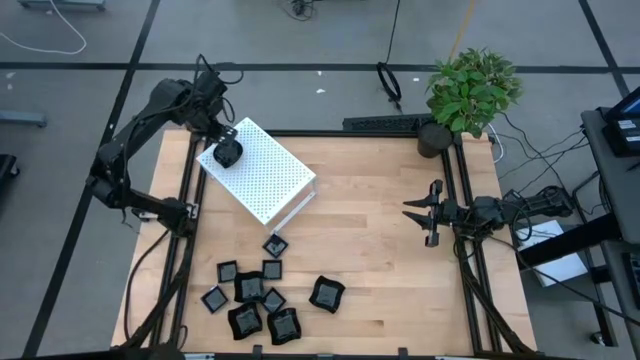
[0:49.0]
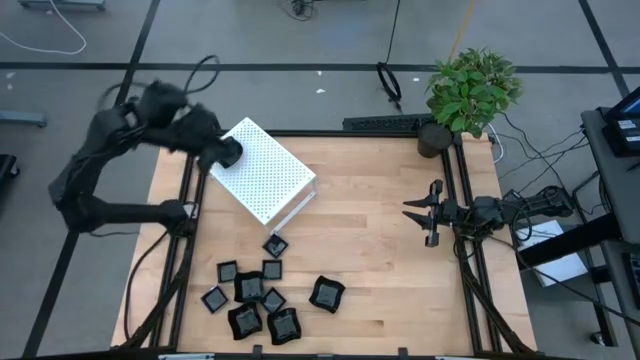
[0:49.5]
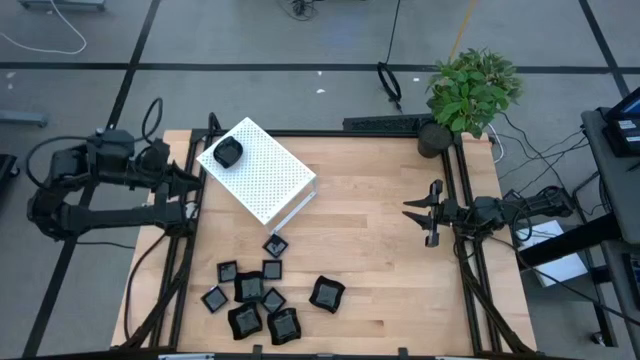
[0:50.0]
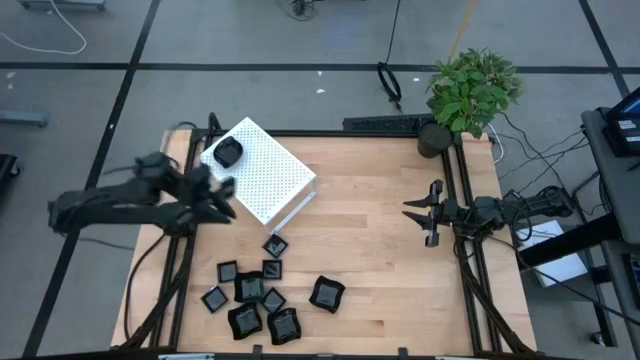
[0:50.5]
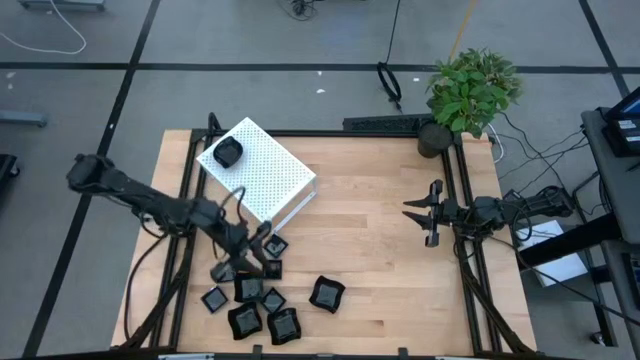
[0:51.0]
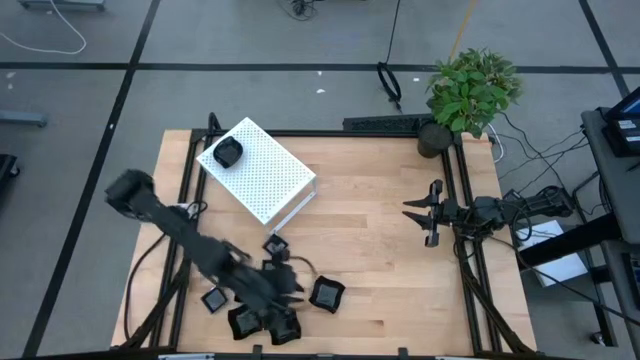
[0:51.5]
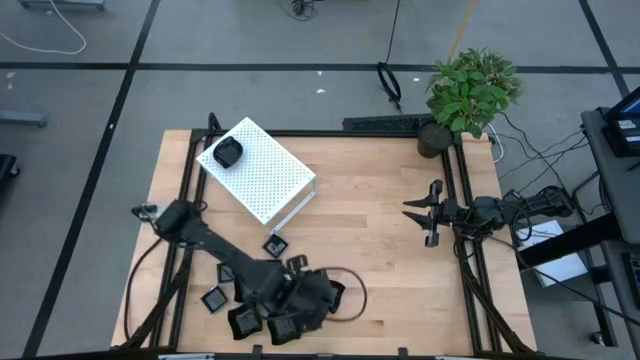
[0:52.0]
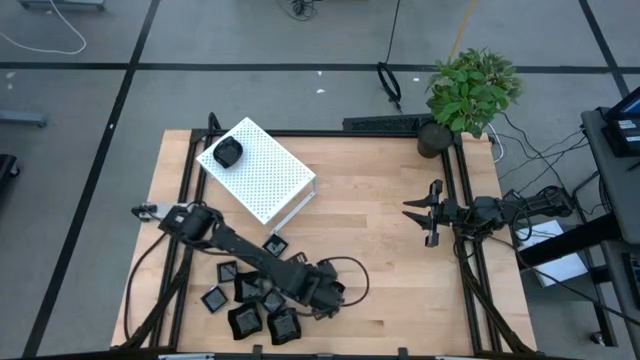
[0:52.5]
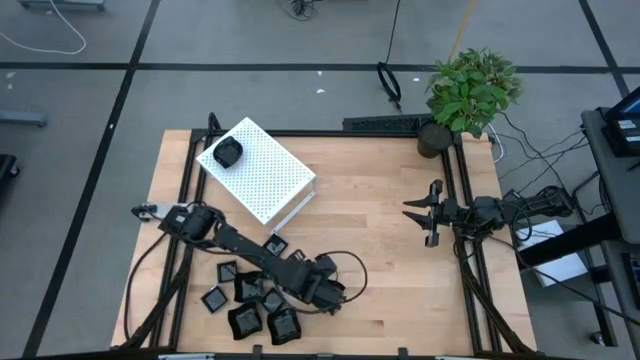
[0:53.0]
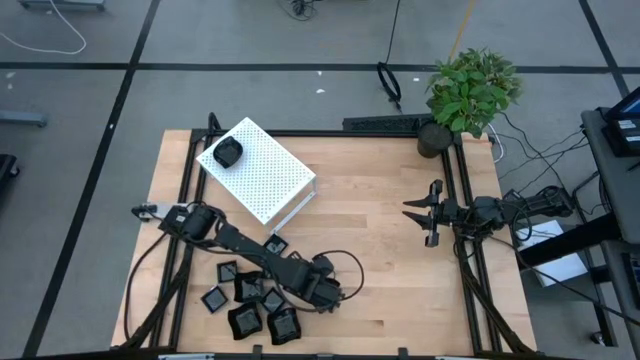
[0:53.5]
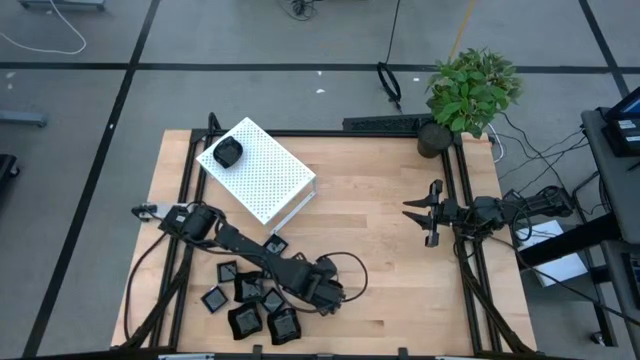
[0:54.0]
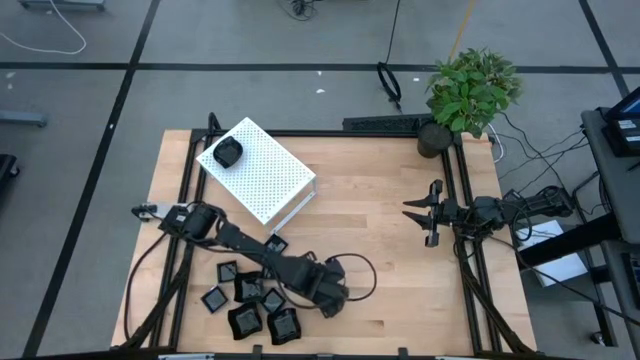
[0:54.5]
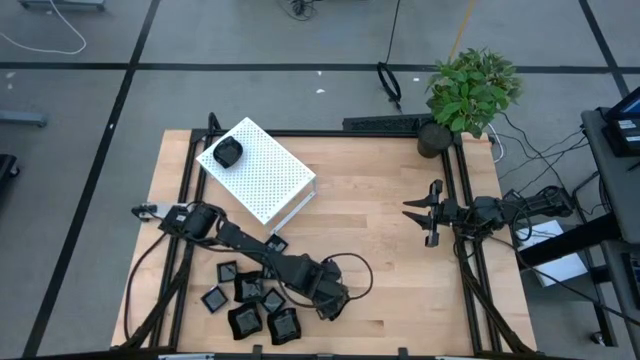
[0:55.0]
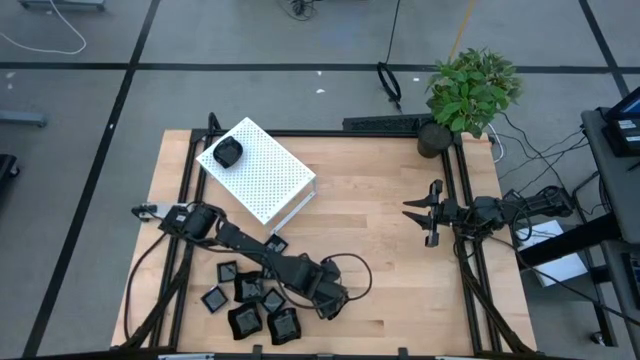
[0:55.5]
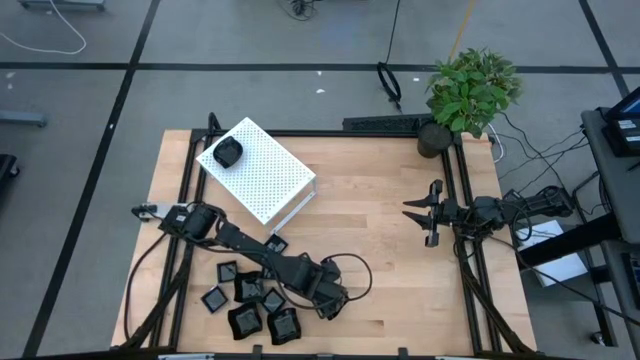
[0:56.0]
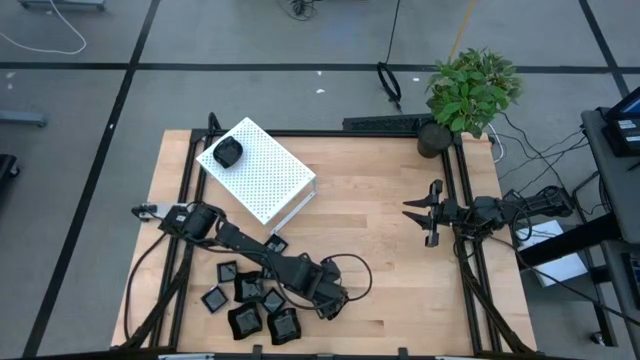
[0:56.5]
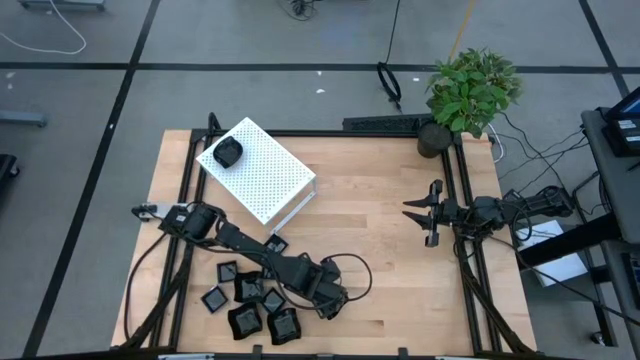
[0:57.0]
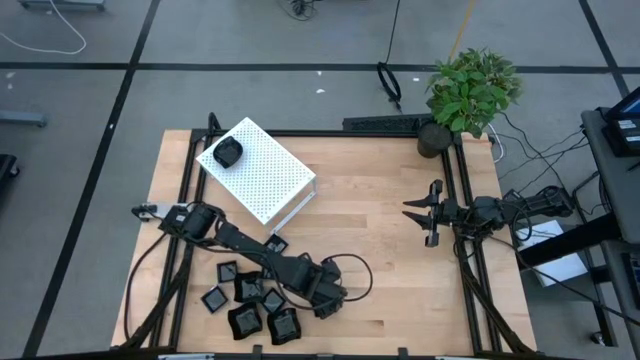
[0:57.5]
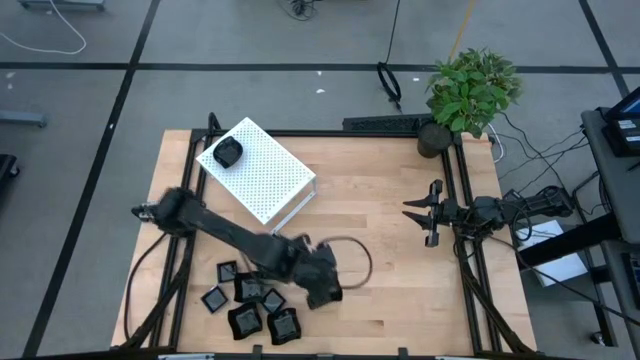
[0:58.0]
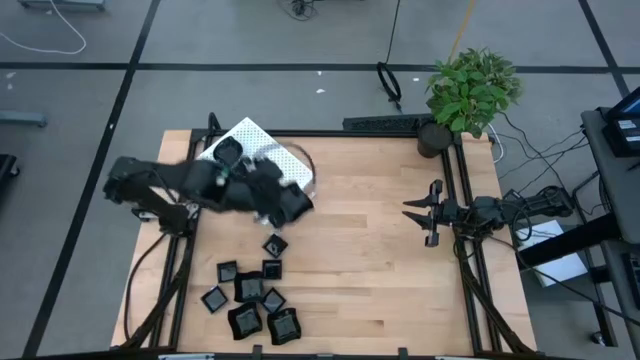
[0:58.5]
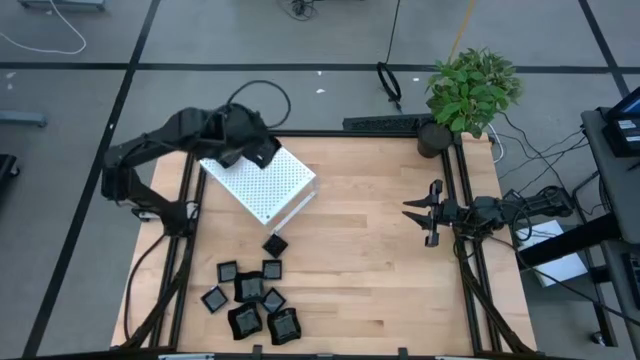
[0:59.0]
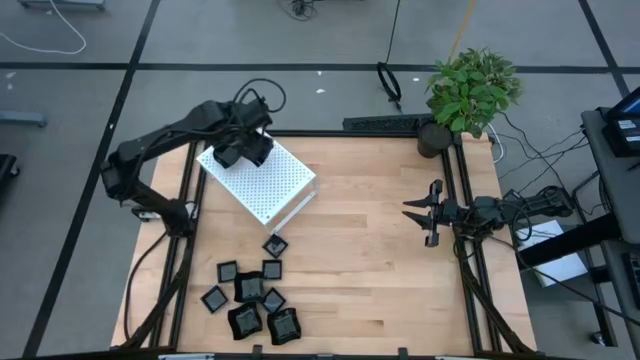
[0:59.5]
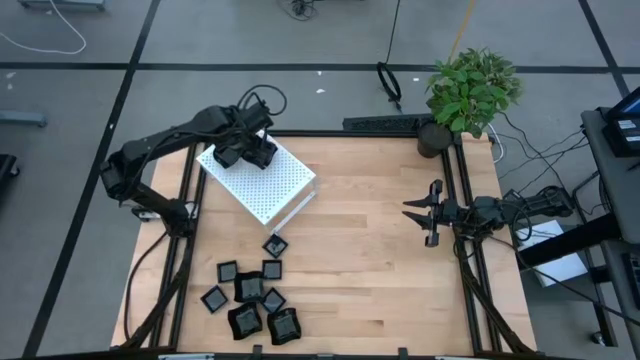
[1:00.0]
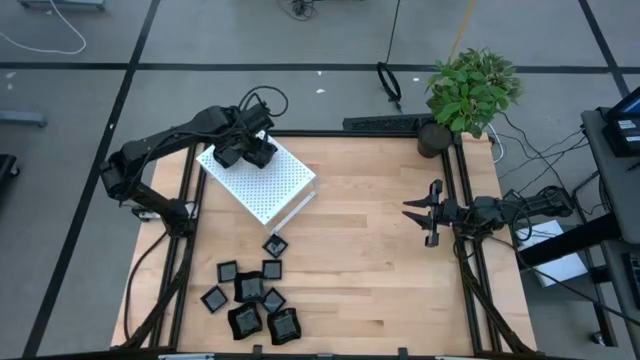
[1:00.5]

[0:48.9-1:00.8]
Task: Pick & Place Mini shaped plates
Put the black distorted square plate on the shelf

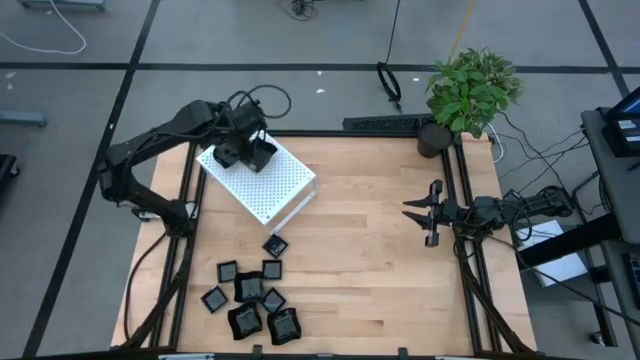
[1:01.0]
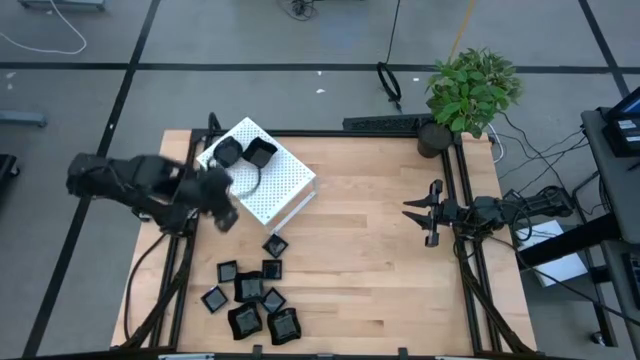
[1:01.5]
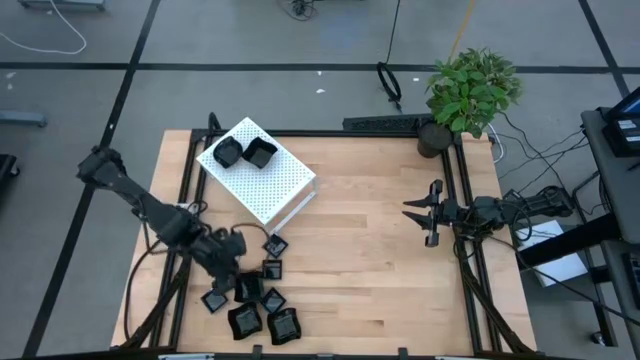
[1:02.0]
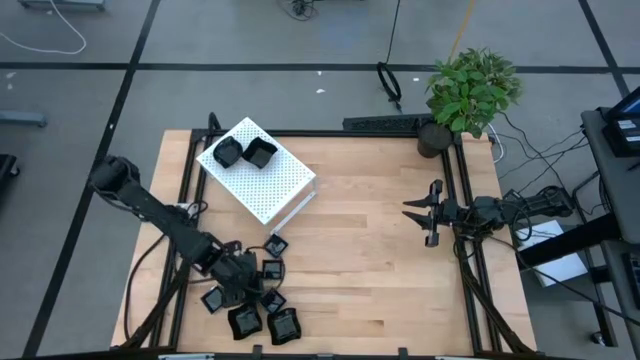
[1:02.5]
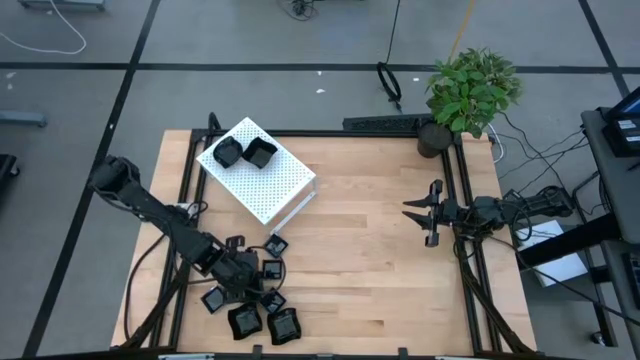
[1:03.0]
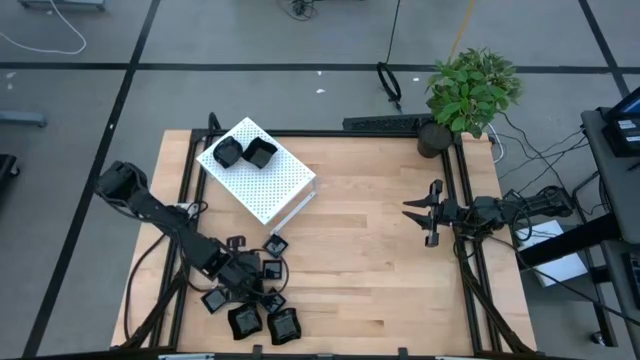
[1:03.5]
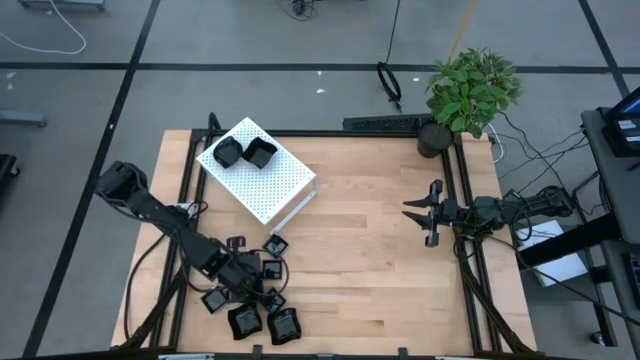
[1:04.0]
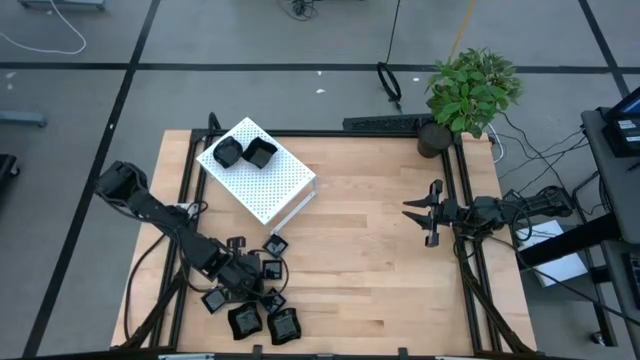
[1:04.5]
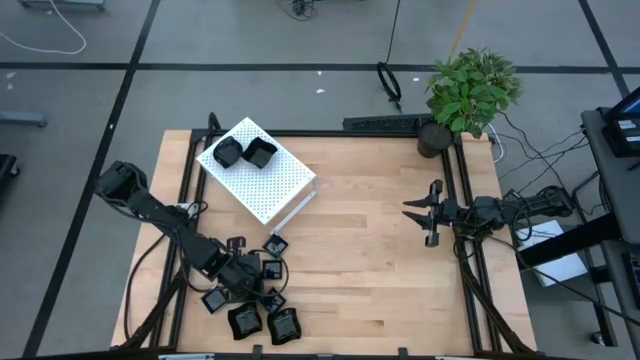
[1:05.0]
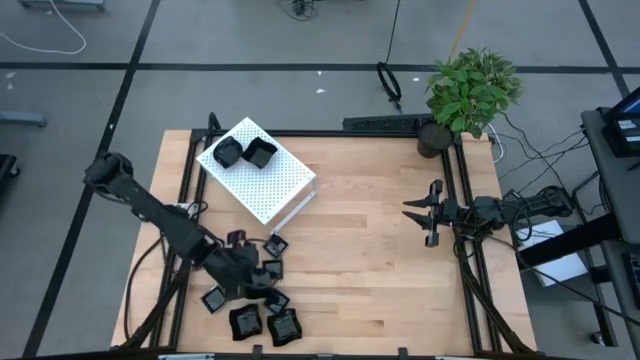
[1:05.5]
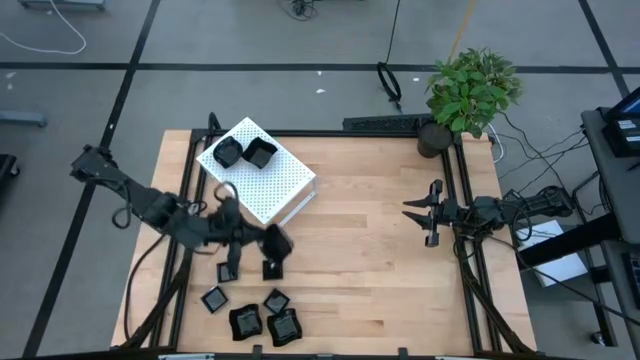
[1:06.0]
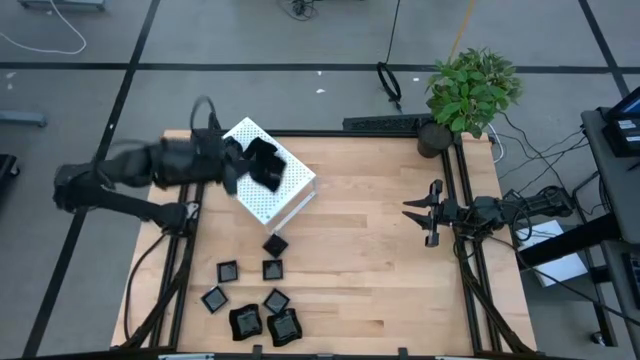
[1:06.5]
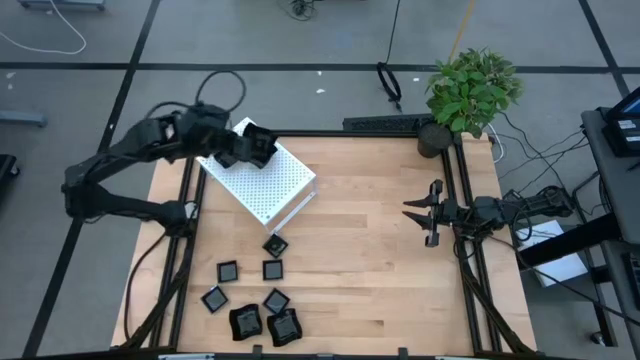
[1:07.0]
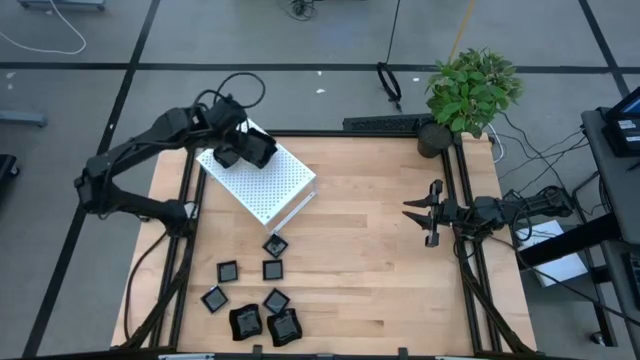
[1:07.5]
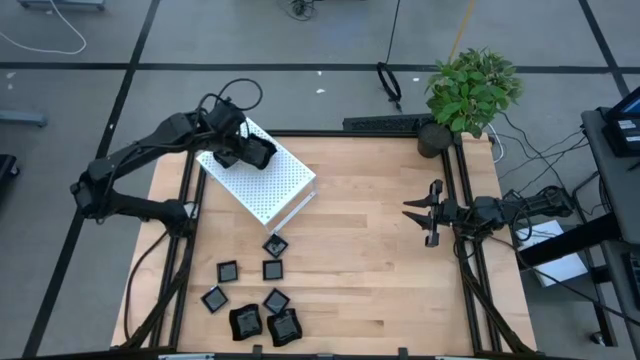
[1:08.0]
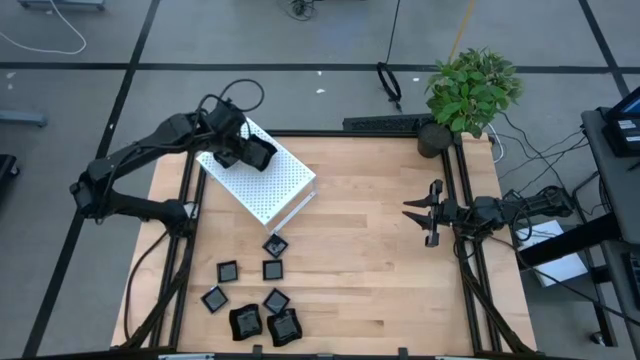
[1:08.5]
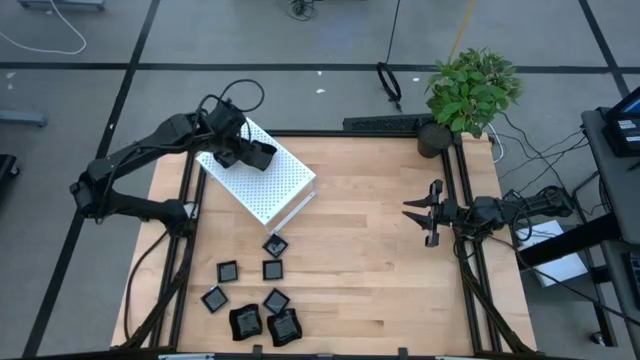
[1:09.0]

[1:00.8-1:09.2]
Stack the black distorted square plate on top of the black distorted square plate on the shelf
